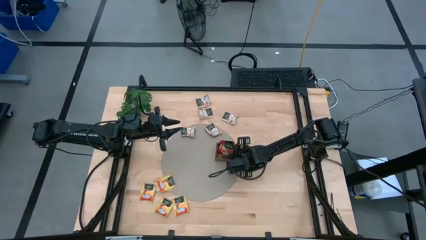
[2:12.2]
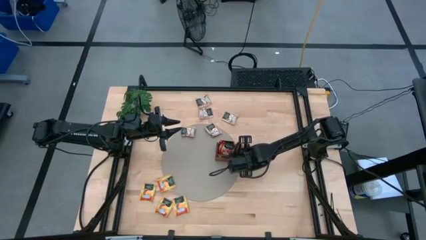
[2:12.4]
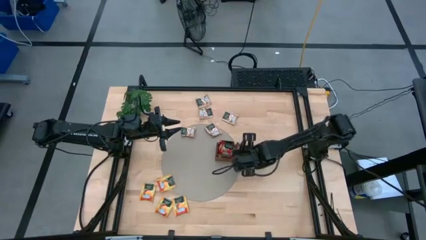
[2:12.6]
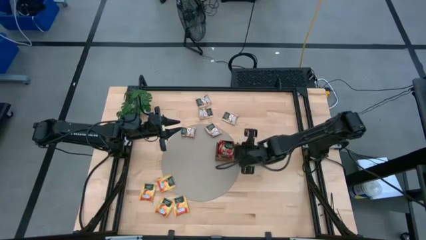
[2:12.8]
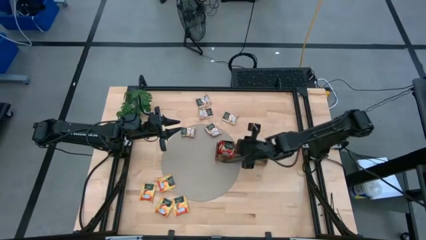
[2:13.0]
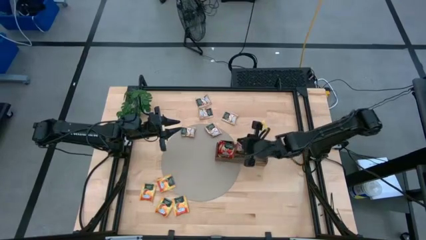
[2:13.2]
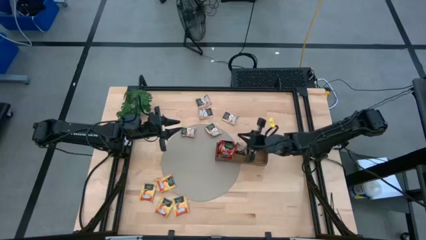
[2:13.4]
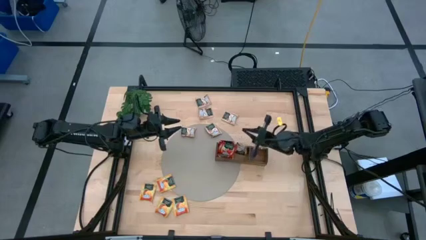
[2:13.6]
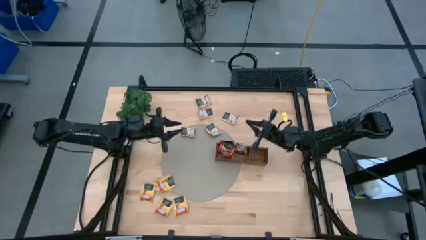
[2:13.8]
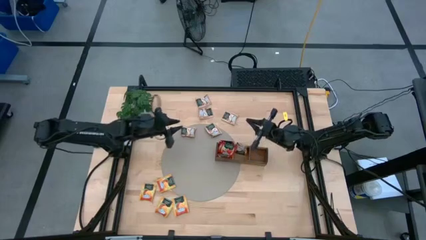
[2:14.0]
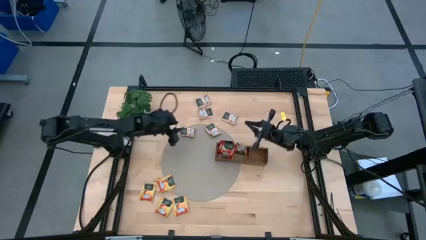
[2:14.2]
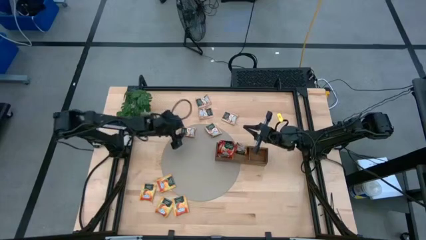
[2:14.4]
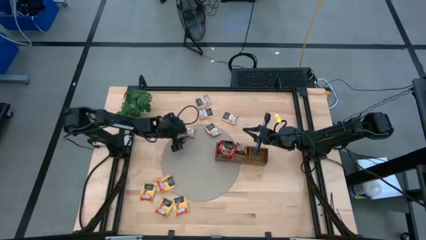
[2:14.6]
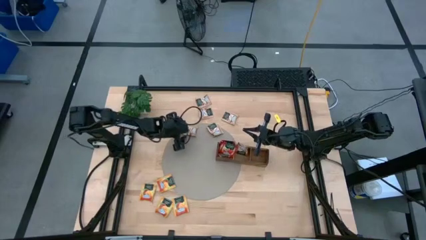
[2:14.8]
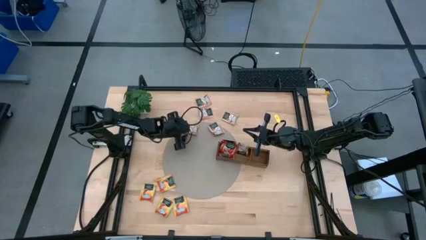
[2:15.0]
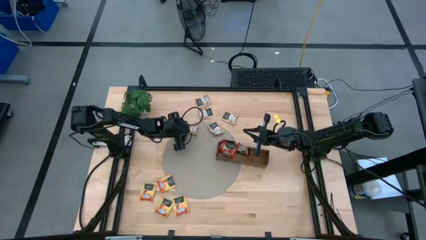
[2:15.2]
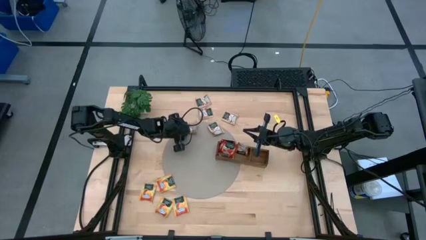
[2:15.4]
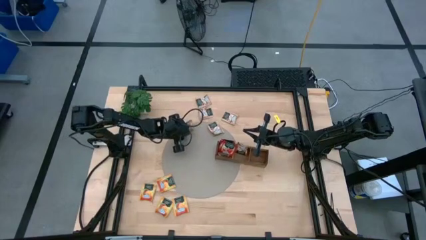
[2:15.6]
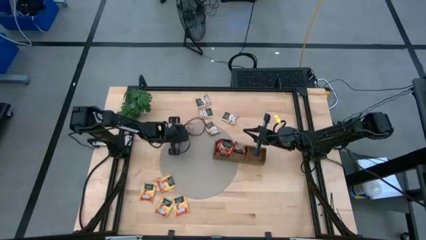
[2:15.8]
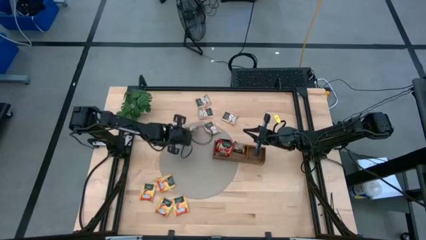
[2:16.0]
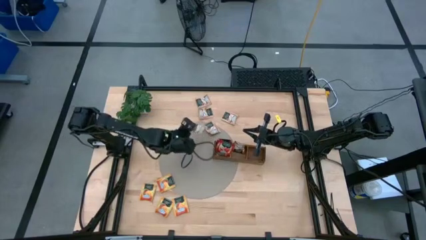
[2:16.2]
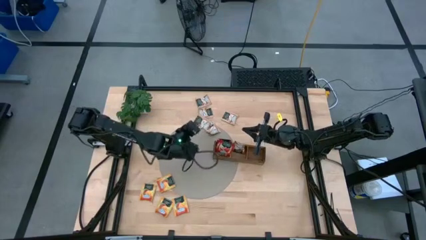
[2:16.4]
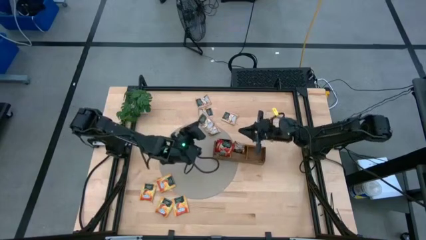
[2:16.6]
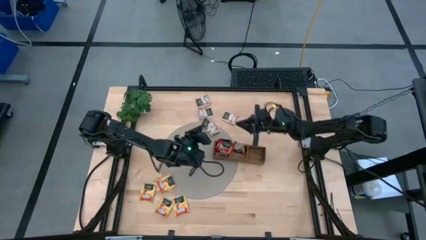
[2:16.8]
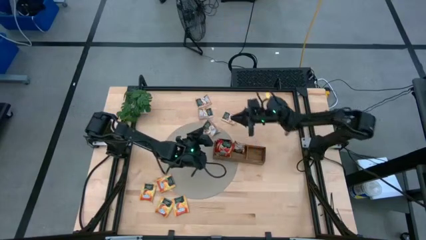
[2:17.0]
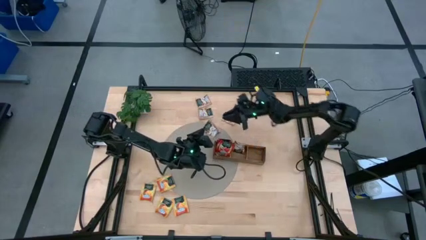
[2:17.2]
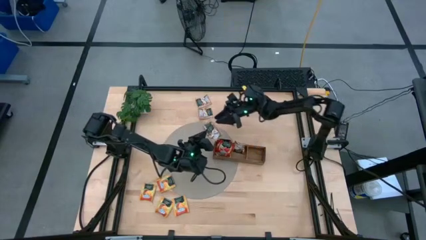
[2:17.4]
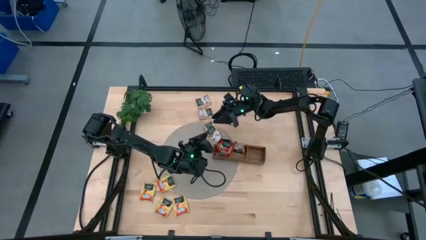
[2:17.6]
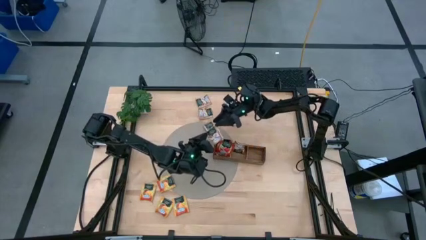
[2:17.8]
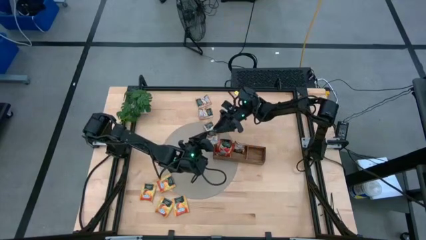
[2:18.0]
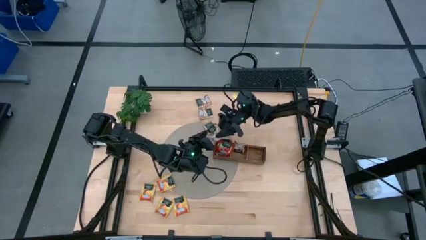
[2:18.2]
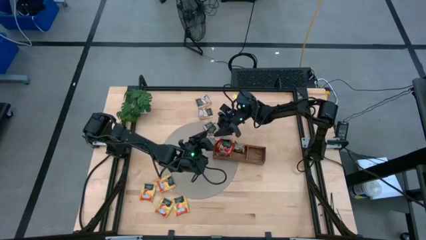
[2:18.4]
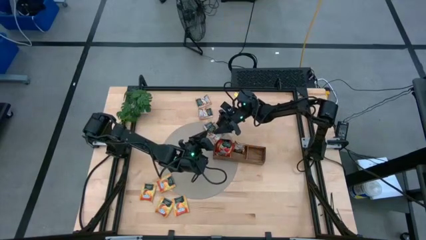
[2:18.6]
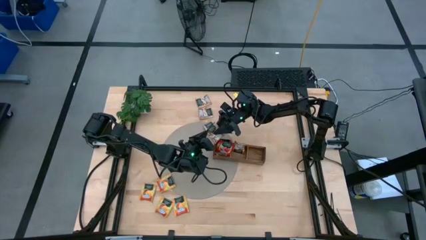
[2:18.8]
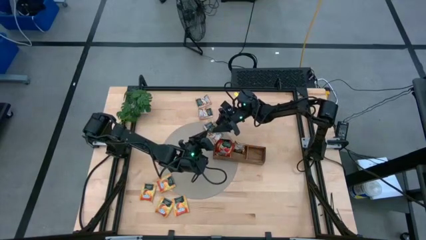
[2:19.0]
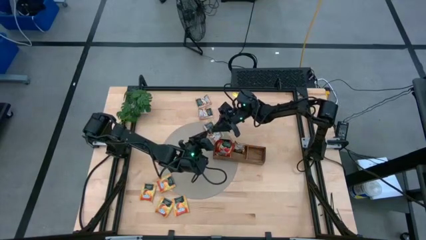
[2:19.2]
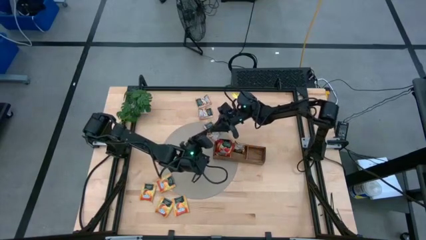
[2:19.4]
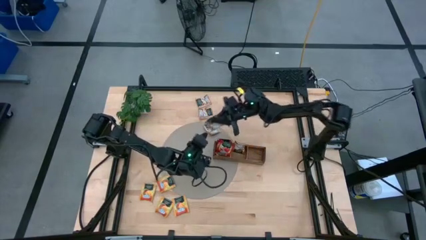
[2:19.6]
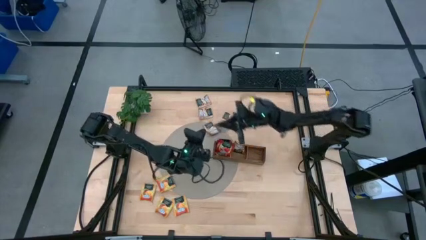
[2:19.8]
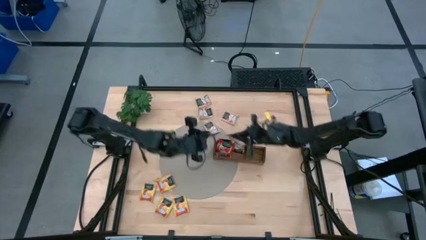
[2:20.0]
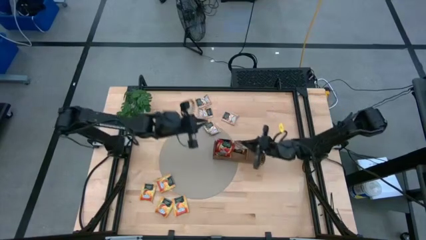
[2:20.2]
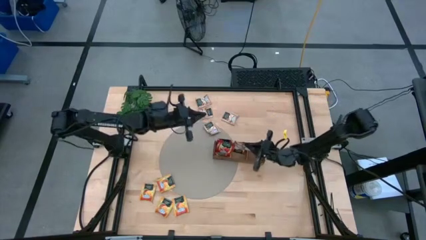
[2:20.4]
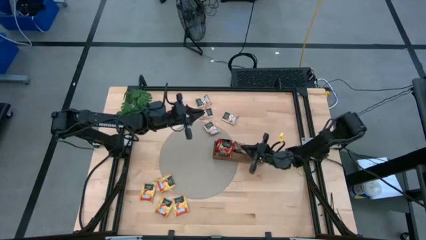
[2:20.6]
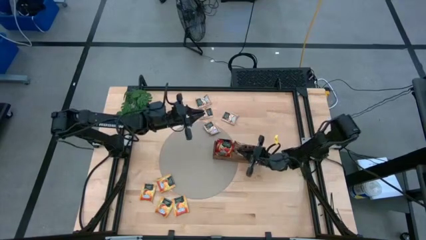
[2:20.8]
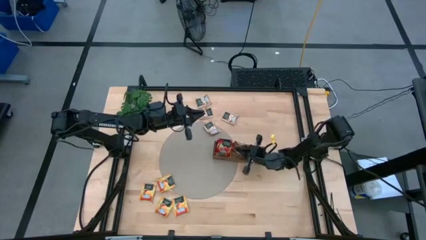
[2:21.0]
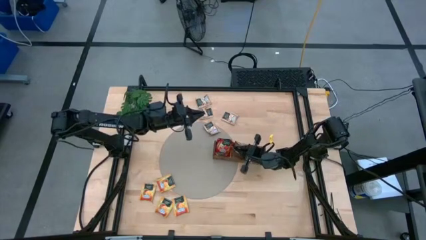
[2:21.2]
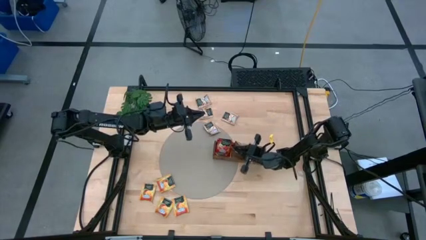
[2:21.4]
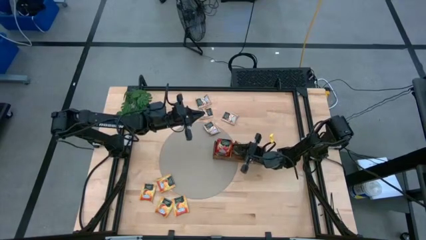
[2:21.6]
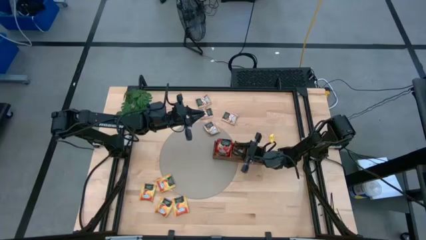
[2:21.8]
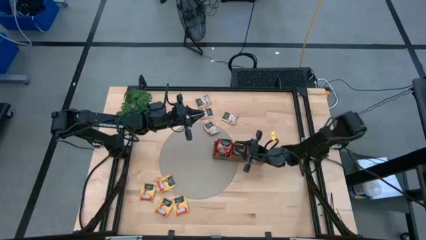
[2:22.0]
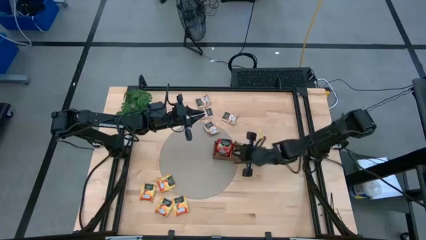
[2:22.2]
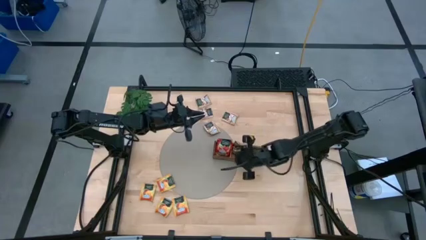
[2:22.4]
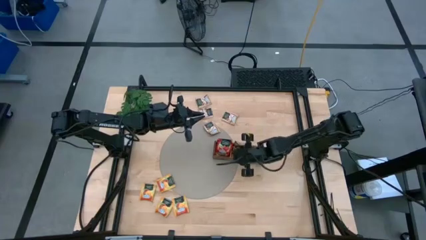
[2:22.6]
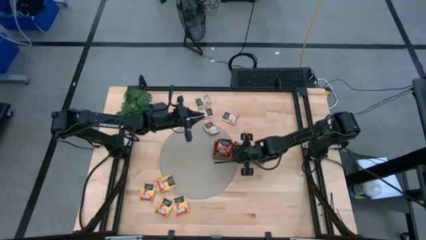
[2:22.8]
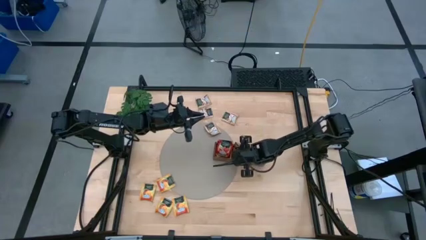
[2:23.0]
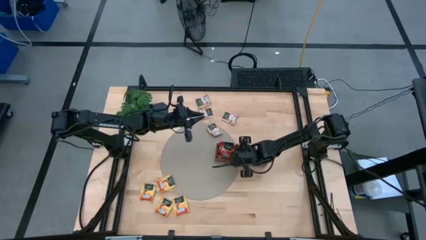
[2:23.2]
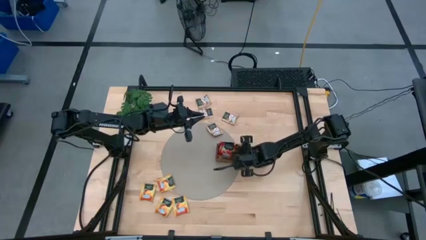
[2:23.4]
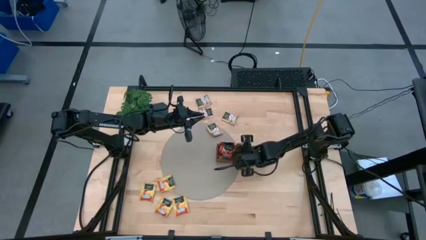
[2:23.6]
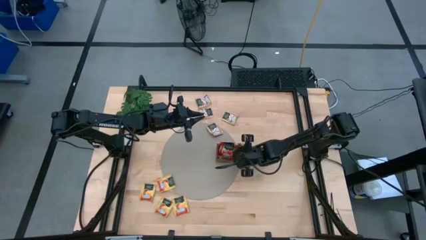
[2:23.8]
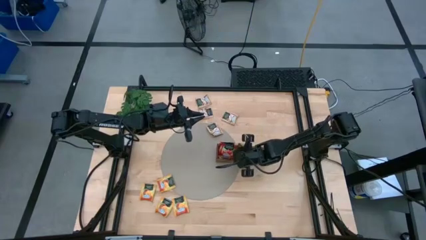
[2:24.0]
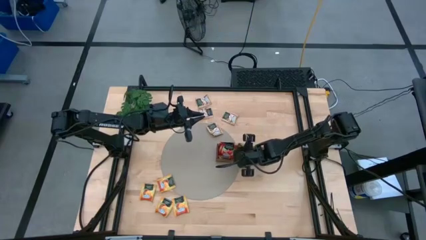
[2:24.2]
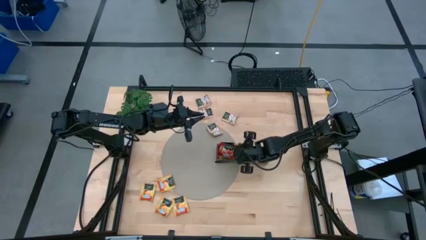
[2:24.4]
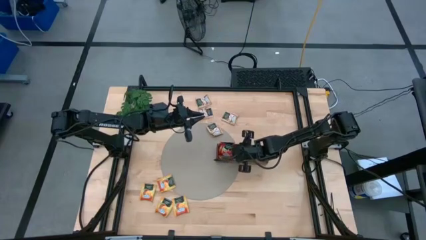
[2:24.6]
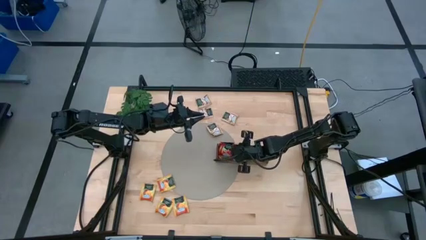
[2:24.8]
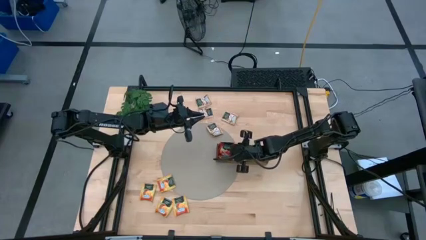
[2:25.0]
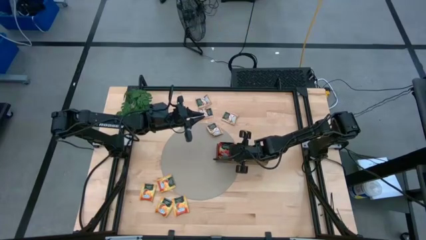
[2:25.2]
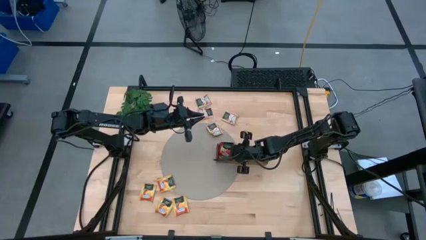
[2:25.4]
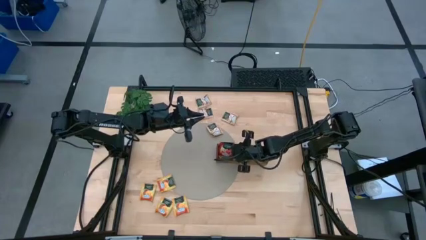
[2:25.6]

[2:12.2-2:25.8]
Task: Pick & Place Tea
Put the brown tea bag into the middle section of the wooden organizer

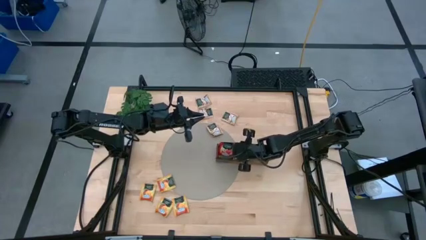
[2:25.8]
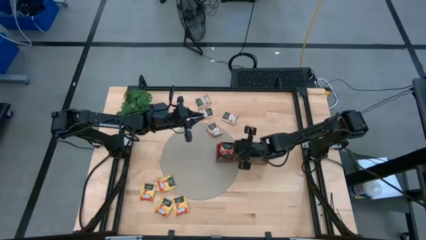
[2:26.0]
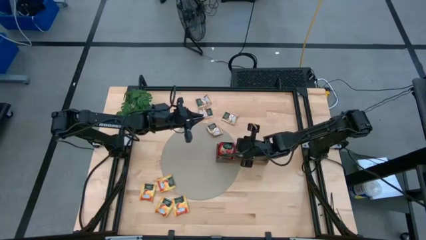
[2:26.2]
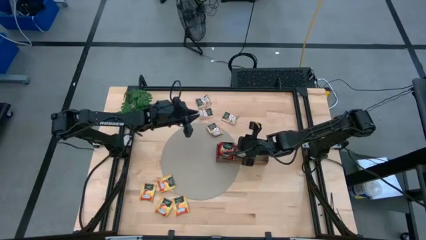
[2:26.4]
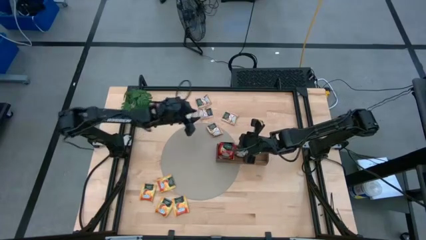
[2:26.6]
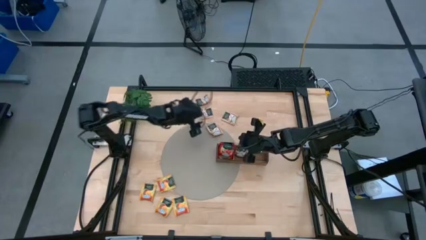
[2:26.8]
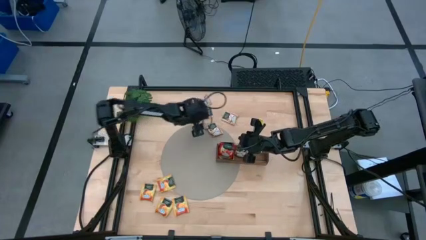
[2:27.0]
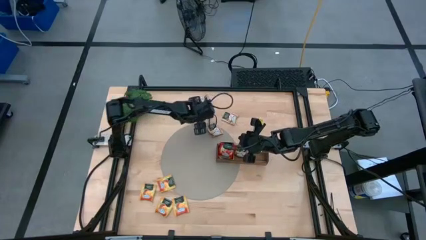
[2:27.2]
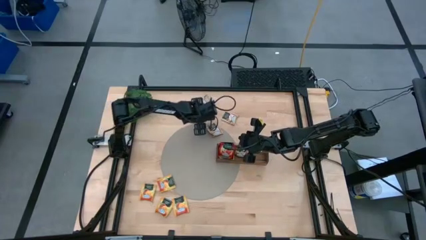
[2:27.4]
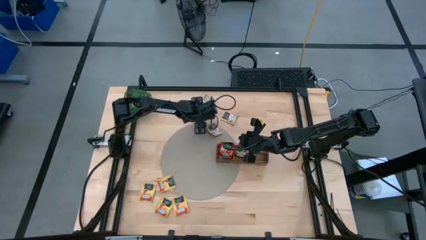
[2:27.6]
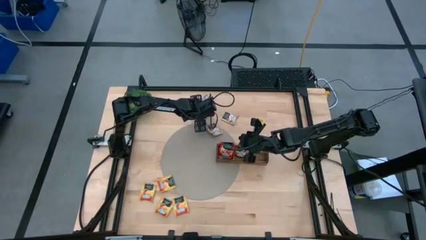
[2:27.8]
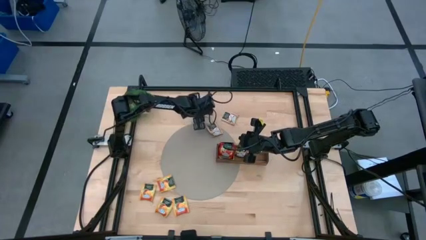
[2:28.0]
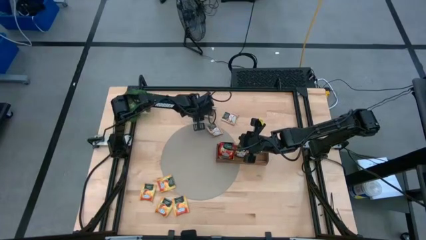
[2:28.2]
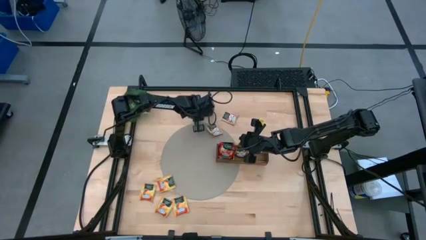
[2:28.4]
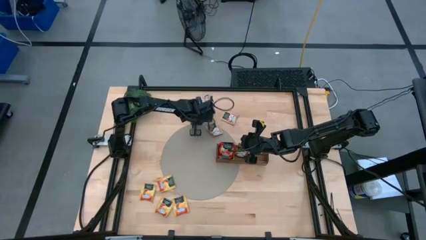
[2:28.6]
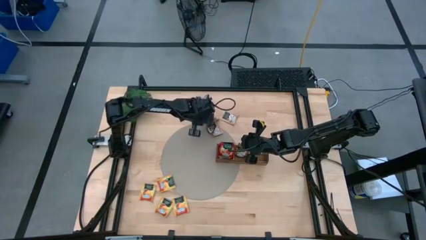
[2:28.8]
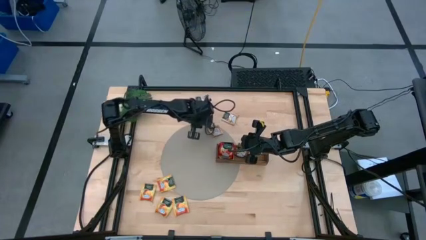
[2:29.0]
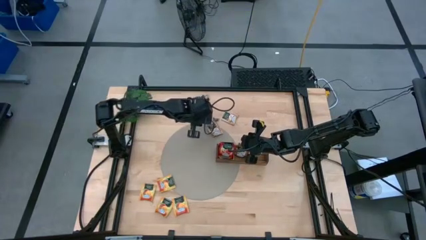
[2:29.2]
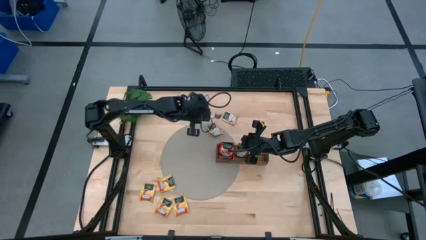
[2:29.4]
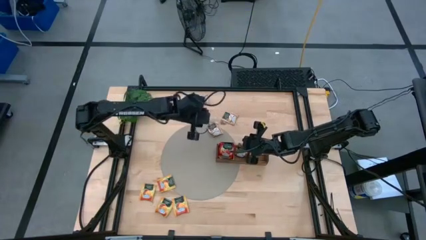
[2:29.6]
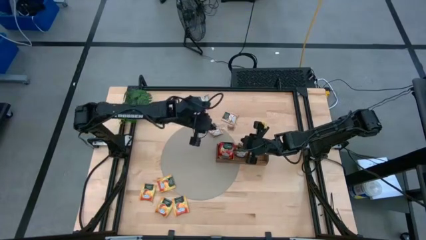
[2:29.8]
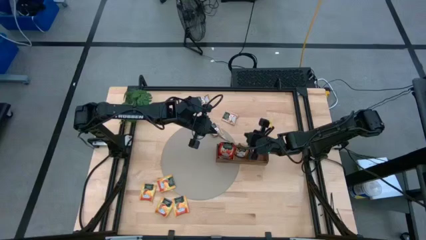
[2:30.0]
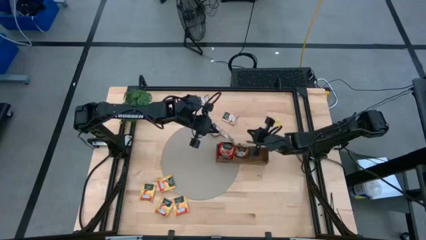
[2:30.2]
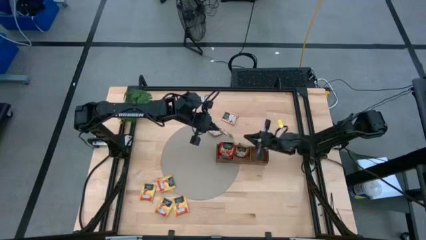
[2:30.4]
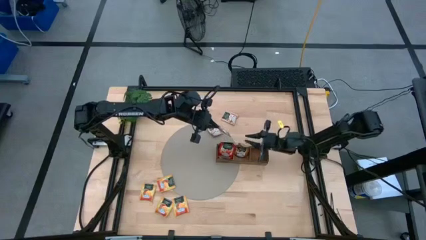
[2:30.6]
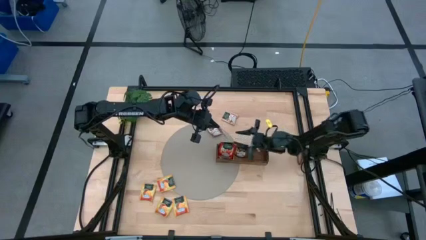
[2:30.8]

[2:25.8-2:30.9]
Put the brown tea bag into the middle section of the wooden organizer
